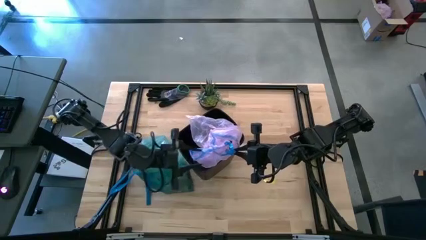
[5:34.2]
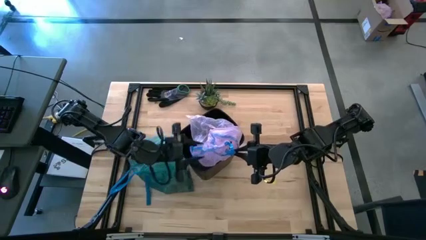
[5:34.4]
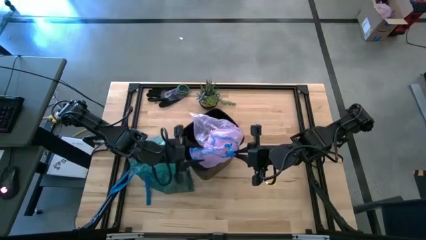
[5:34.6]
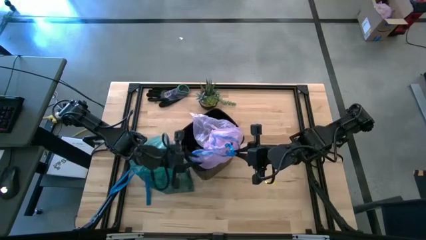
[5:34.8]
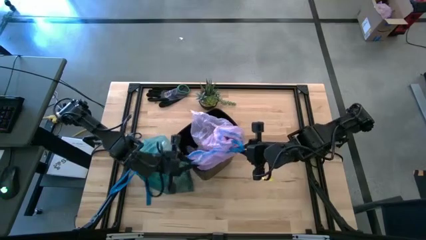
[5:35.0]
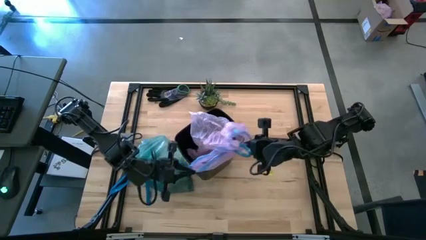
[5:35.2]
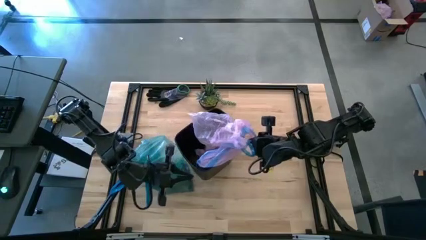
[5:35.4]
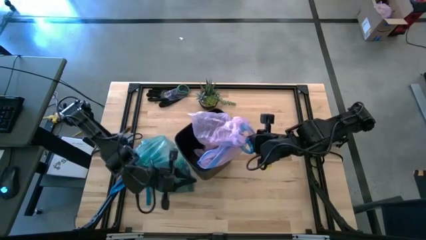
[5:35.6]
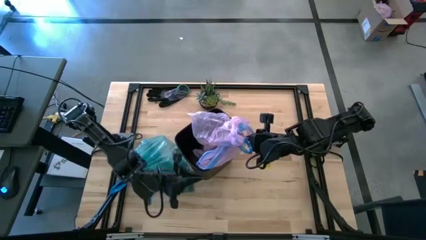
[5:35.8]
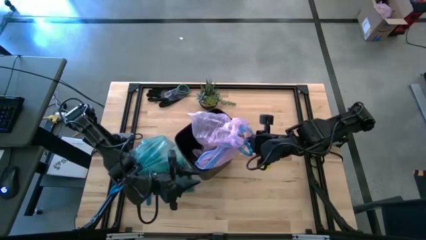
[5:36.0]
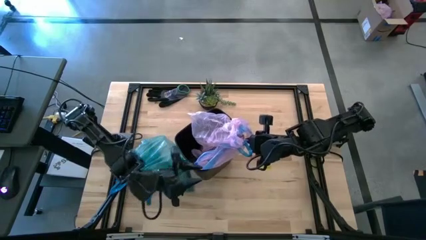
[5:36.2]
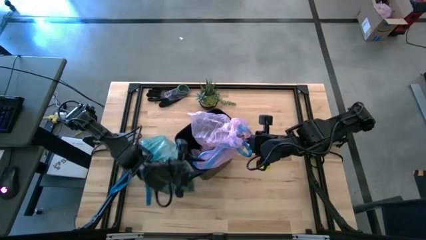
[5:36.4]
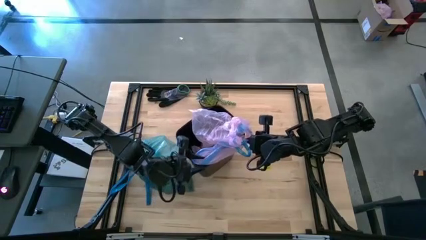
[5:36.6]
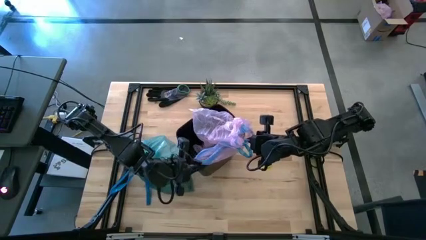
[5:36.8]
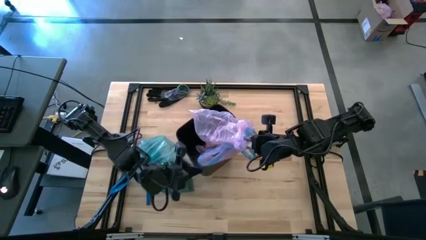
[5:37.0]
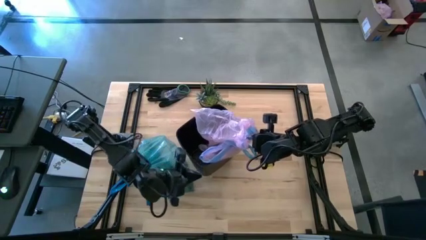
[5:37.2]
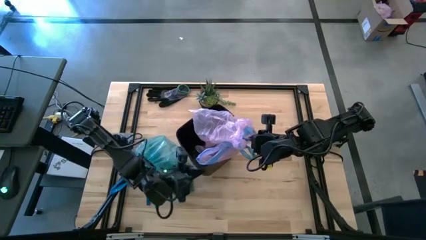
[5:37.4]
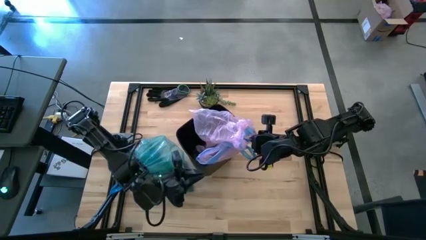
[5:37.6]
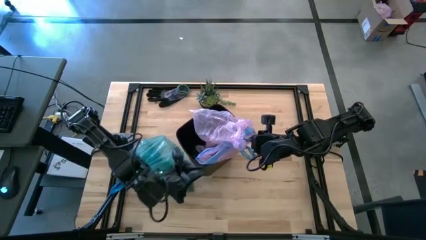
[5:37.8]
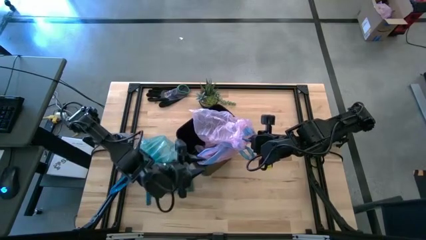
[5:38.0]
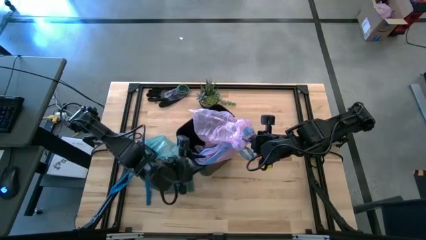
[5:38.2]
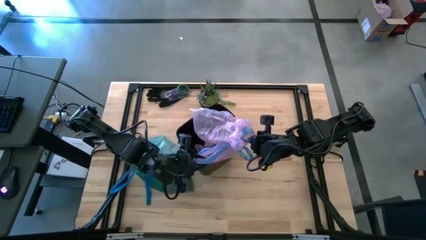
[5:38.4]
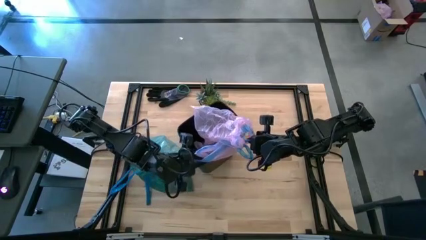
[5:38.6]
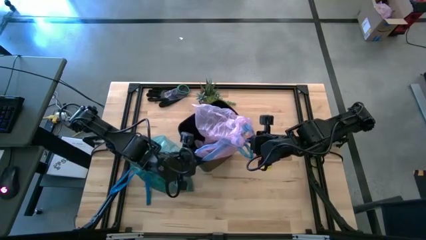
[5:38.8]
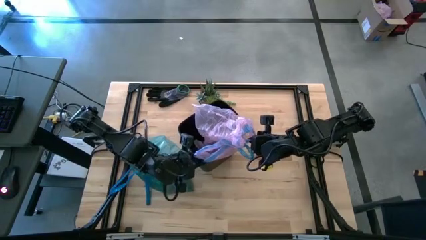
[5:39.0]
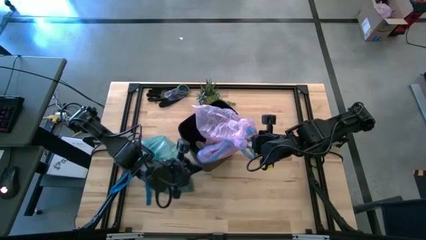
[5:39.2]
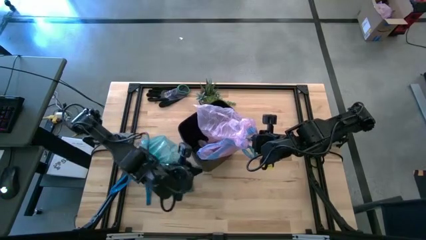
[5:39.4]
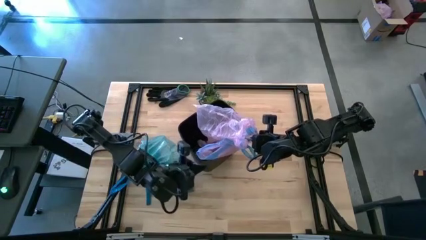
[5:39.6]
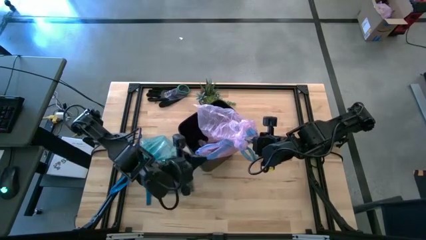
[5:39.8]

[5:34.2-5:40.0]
Task: place trash/remove bag and relplace
Put the pink trash bag into the trash bin

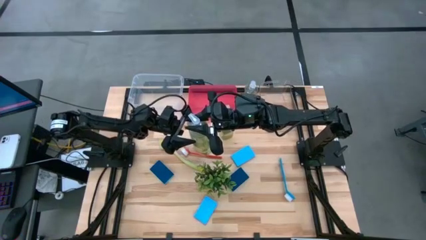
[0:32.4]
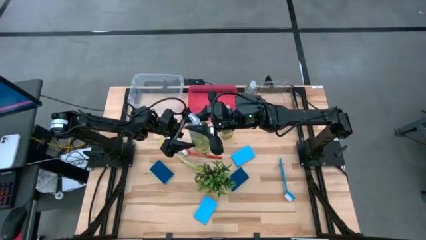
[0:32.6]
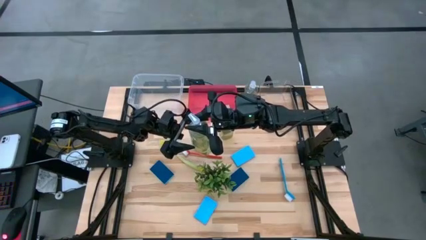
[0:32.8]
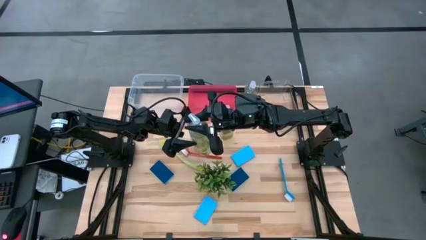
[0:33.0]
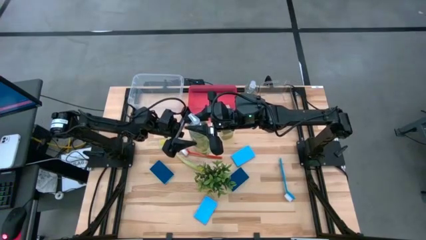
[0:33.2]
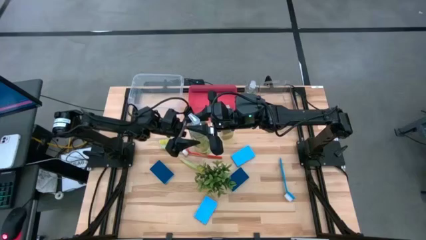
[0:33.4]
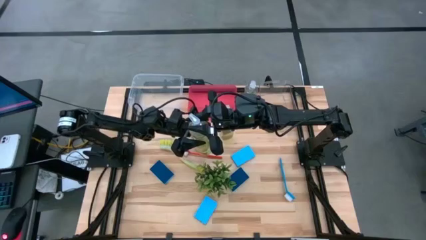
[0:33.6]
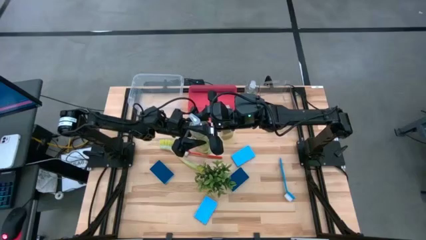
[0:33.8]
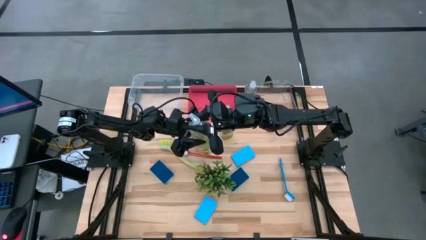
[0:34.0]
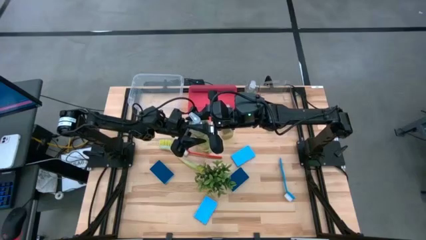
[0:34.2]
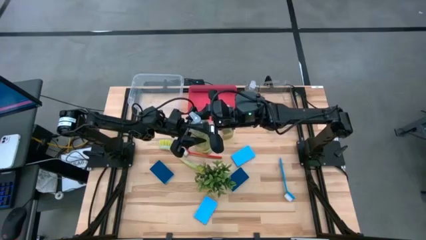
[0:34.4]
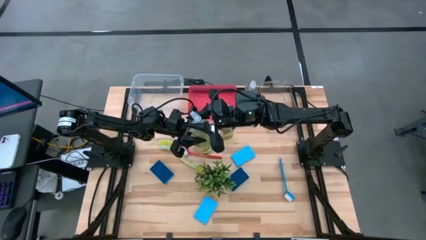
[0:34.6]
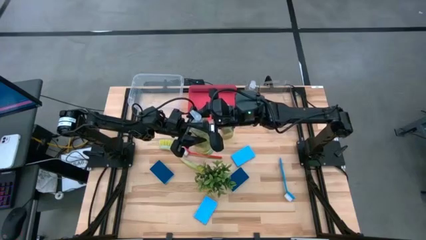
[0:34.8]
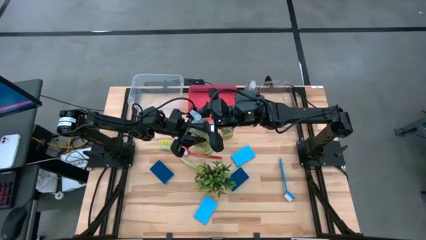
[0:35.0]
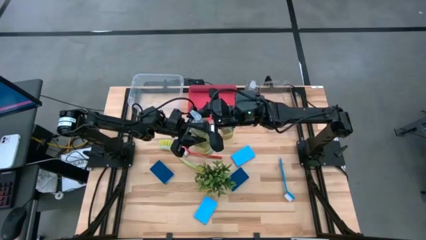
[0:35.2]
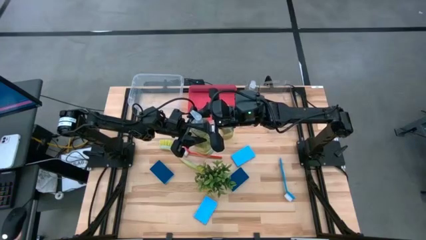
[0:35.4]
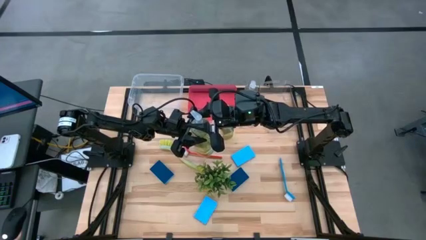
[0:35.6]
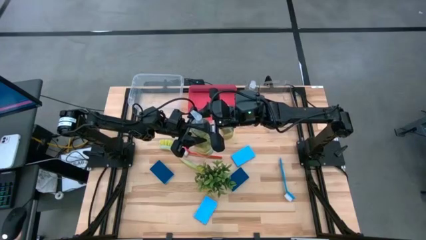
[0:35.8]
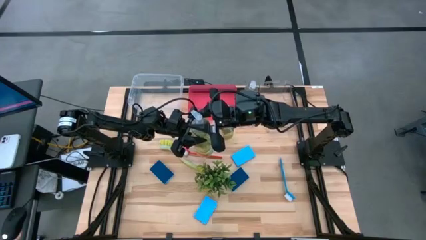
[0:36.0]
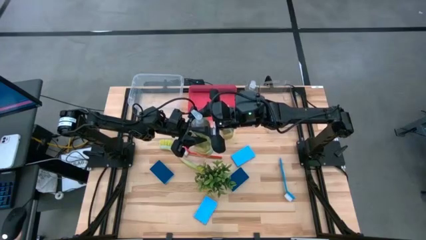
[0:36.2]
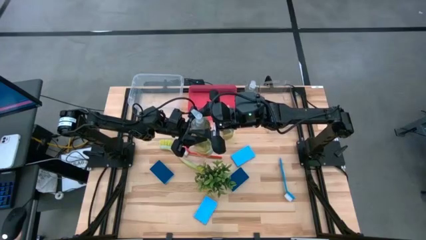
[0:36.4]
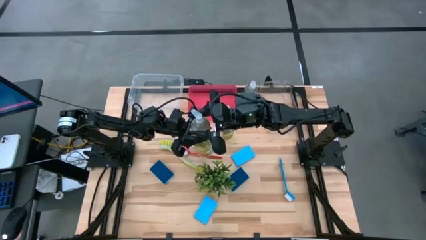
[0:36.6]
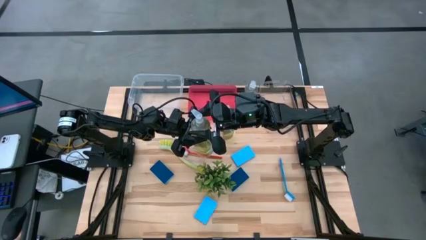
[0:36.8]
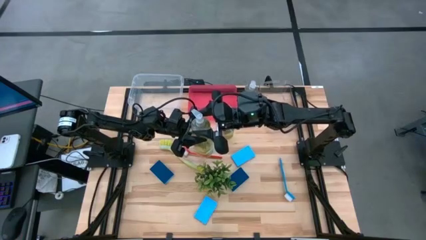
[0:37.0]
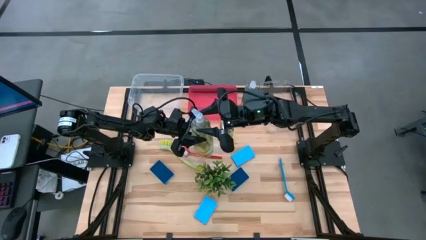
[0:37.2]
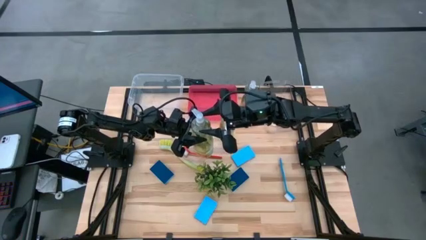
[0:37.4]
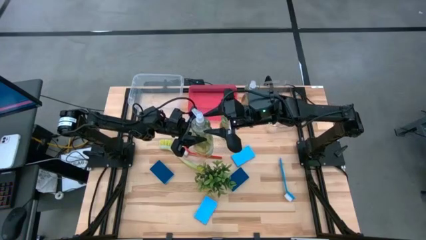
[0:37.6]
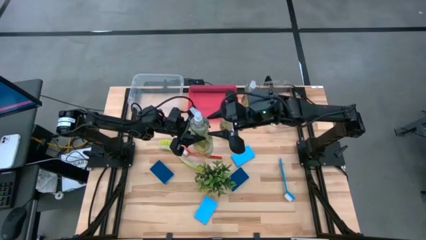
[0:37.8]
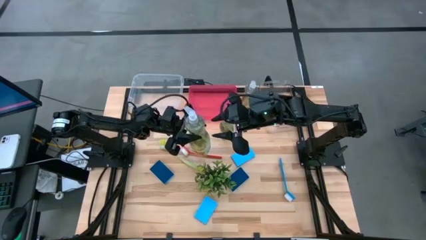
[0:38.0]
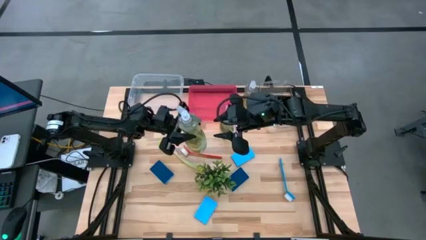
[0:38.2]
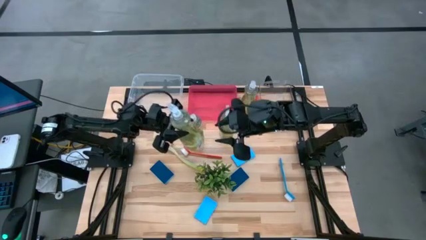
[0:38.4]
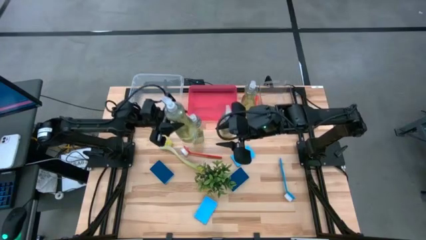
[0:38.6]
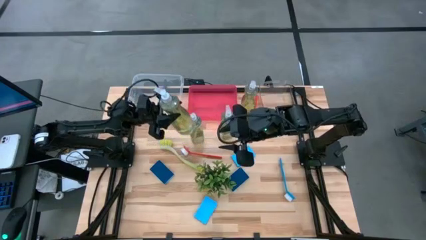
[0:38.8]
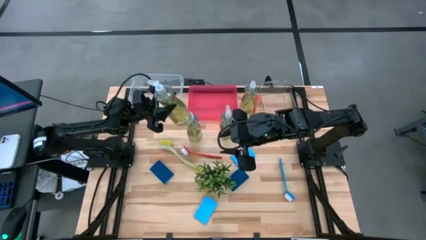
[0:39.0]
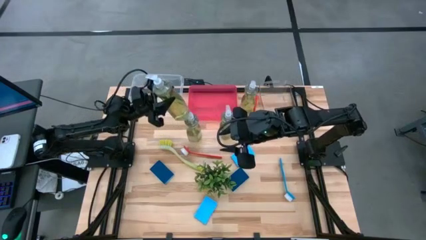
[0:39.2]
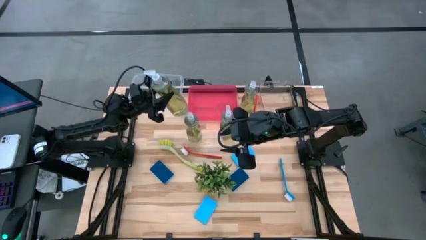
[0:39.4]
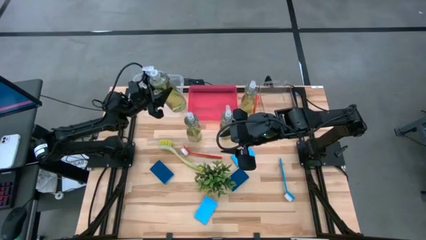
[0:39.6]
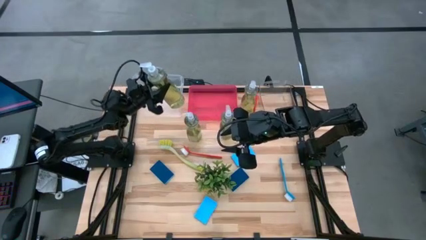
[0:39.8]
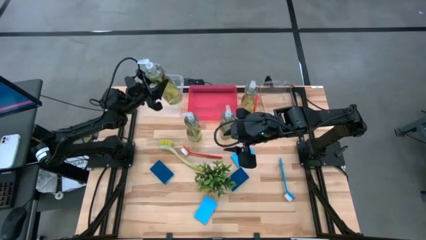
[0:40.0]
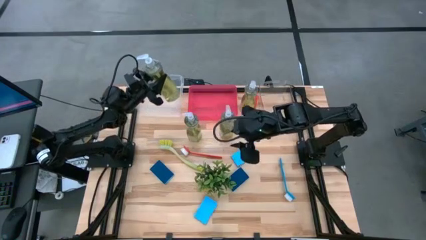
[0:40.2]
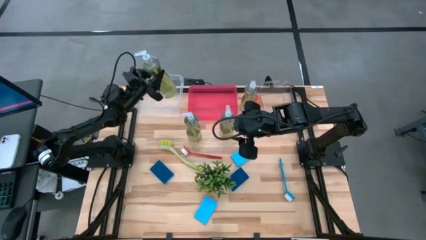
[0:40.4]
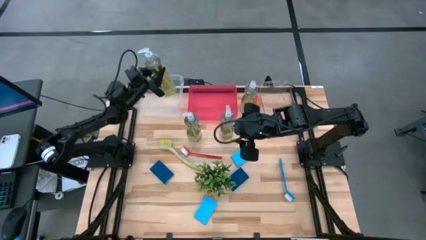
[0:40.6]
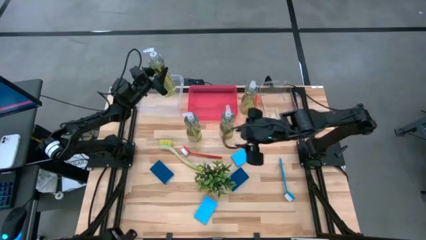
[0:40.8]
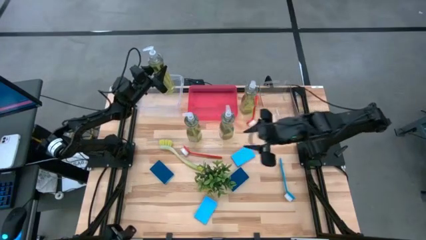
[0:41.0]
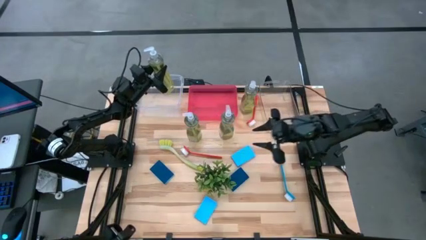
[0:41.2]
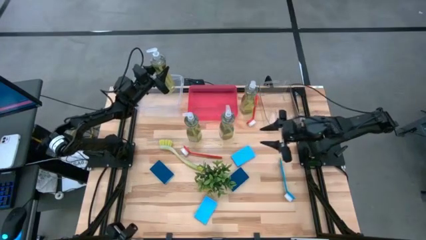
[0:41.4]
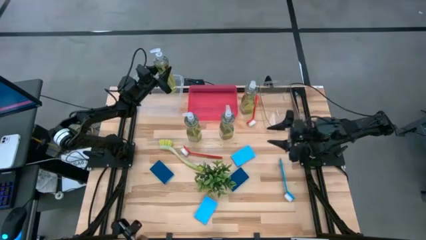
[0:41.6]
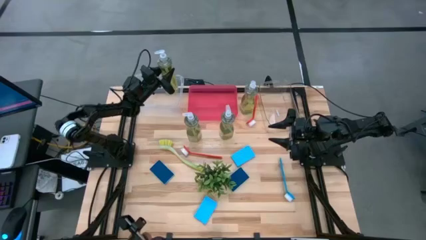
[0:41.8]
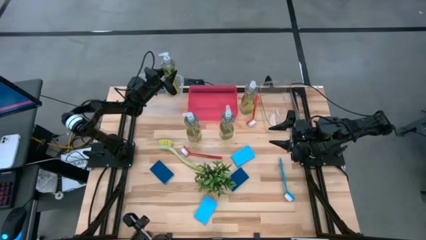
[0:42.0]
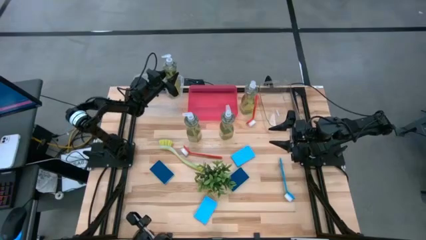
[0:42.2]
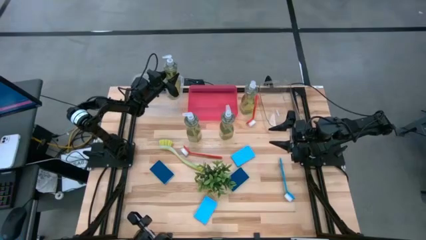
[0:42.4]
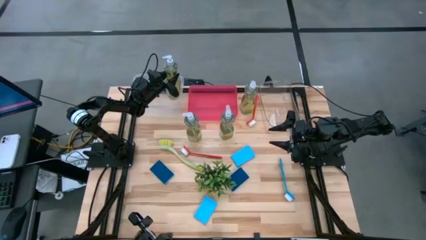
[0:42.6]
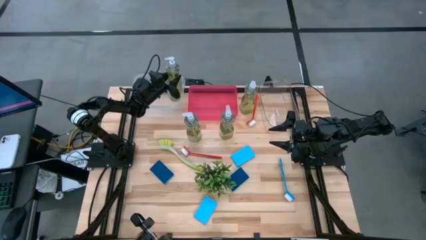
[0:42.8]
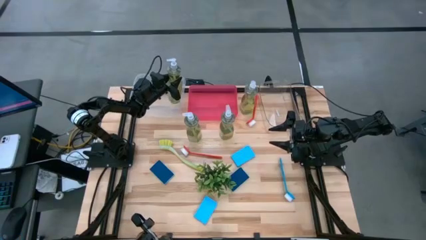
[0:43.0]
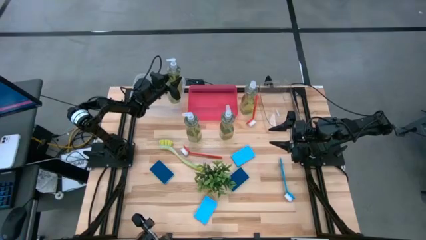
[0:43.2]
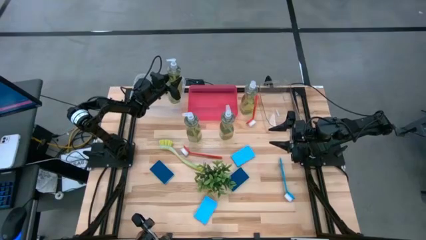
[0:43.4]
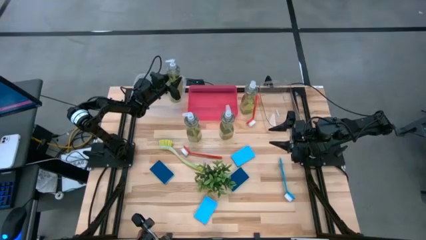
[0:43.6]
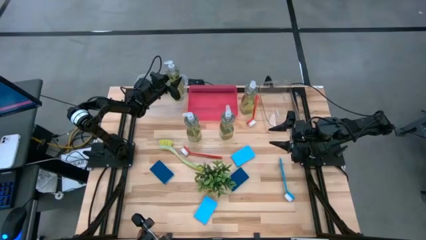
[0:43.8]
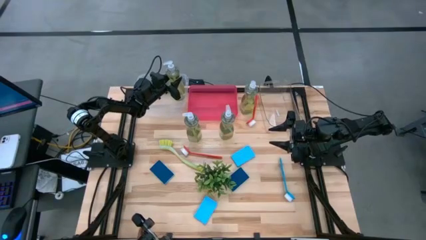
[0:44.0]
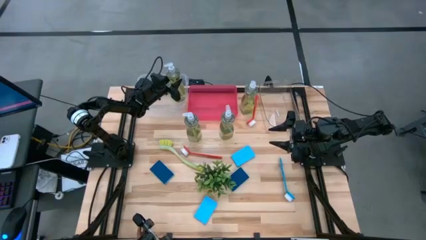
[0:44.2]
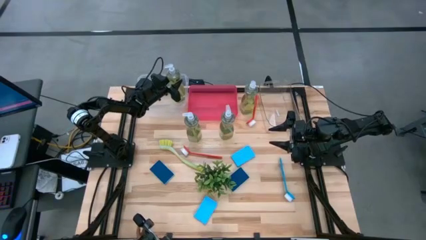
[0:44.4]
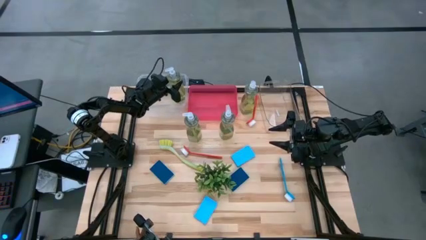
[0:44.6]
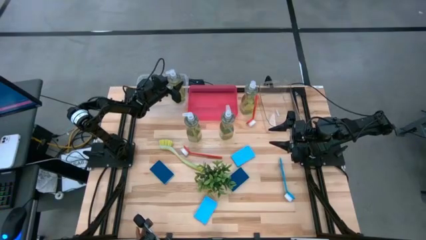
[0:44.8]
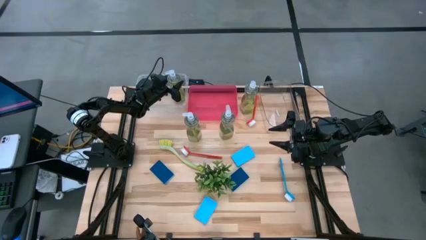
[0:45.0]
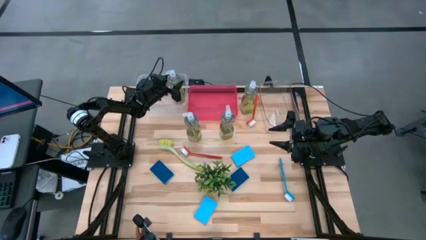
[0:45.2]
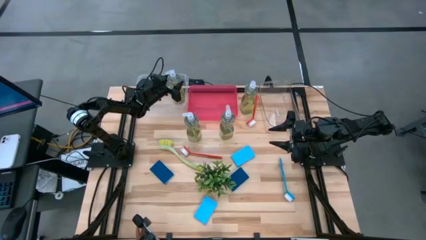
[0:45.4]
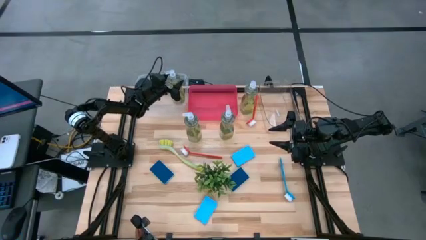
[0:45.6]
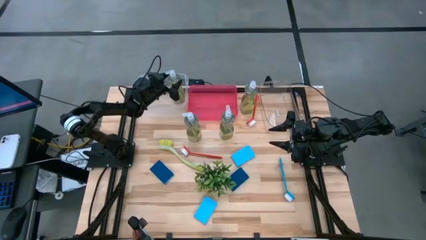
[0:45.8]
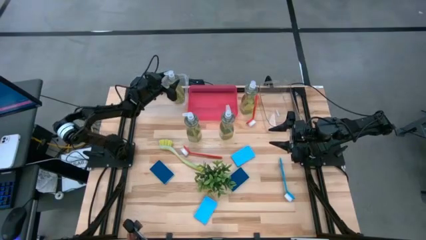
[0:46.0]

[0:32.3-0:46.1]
Task: Pick & Place Kitchen Sink Supplies
Put the yellow dishwashing liquid into the white bin
